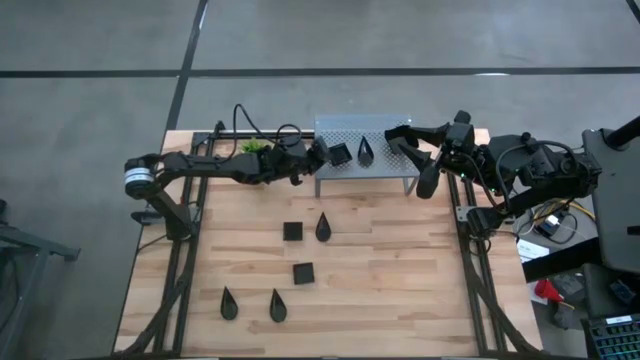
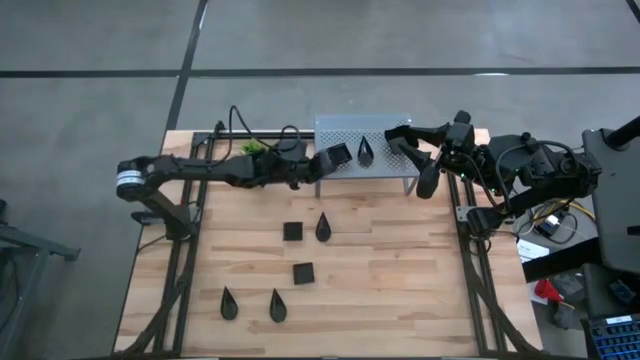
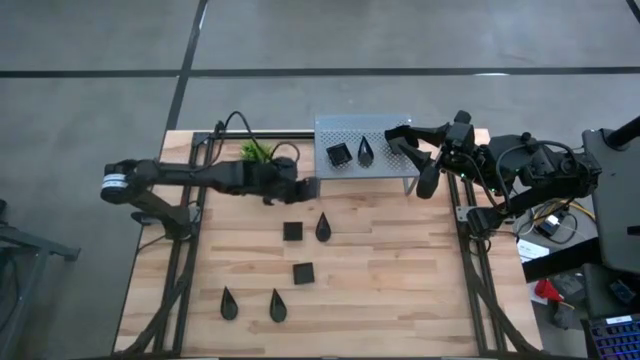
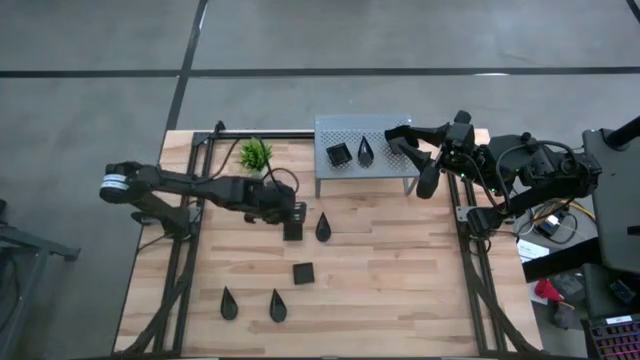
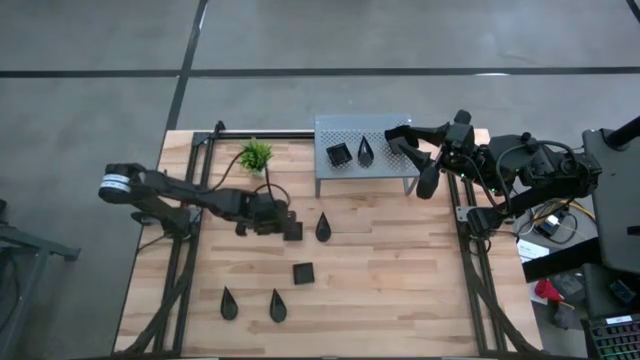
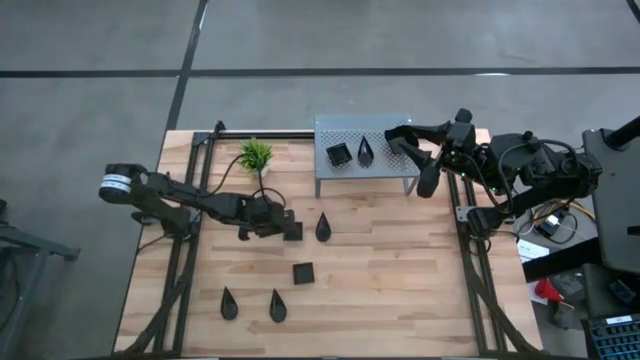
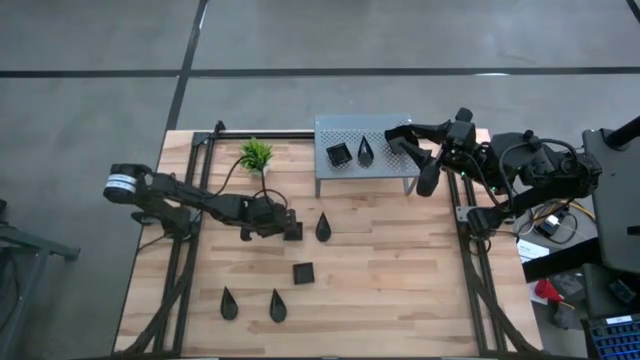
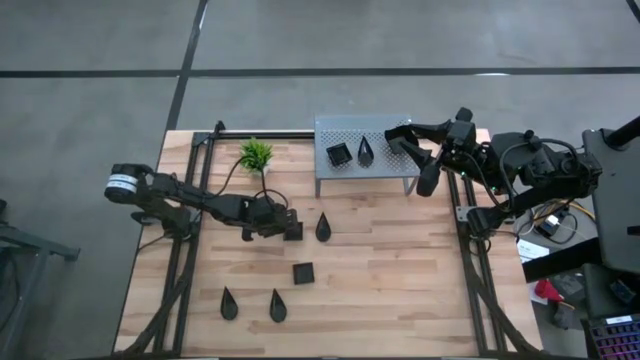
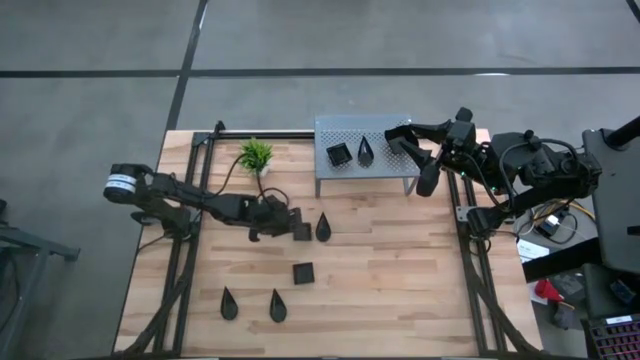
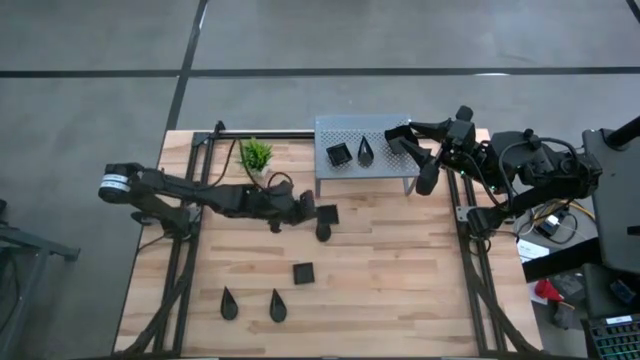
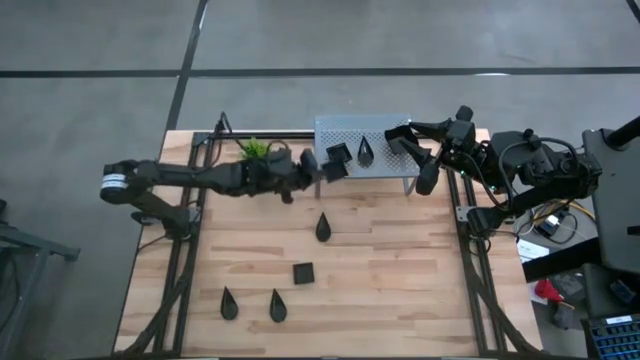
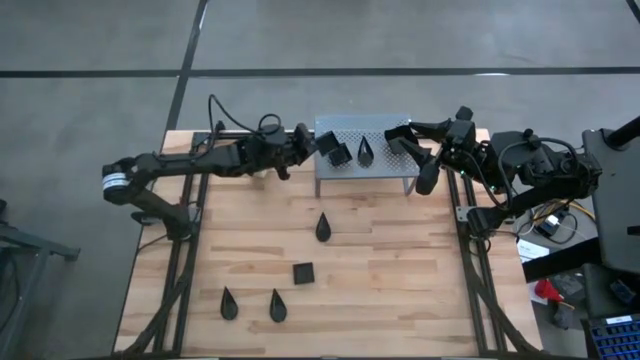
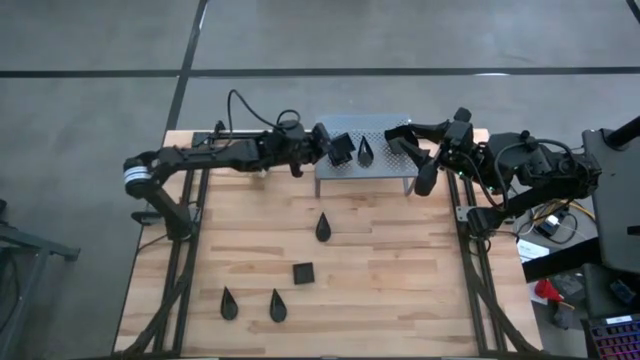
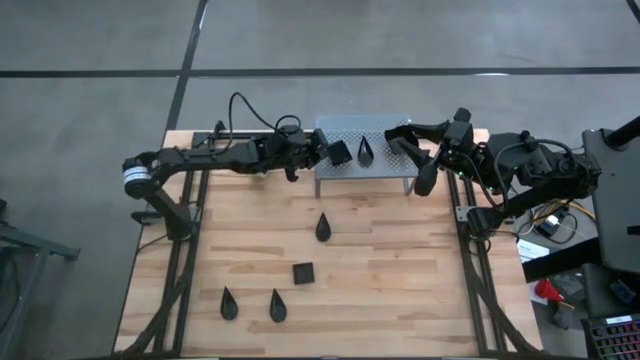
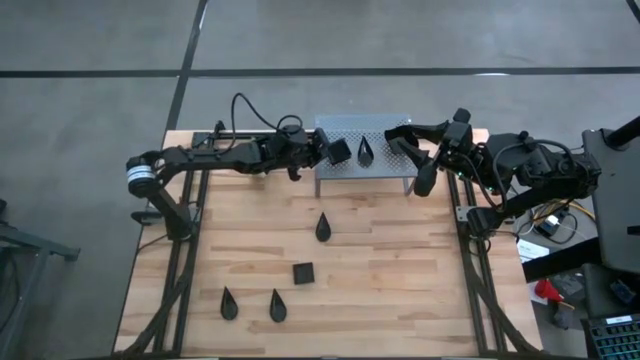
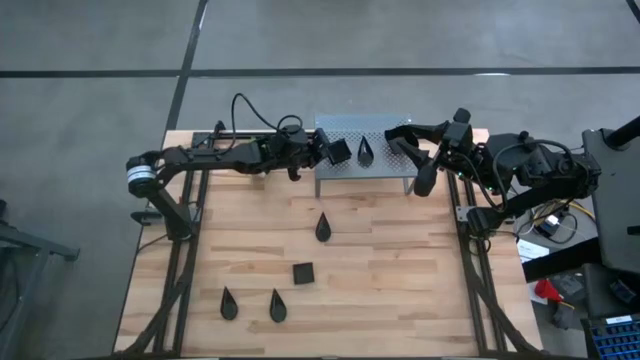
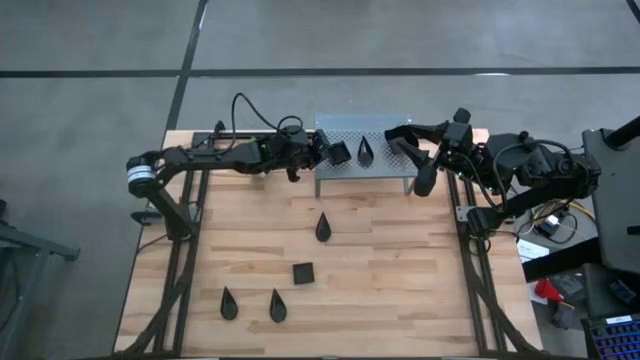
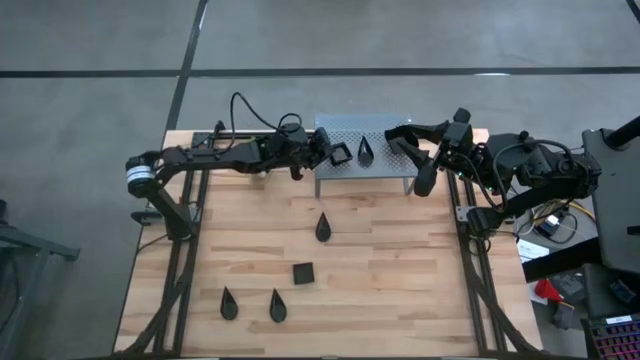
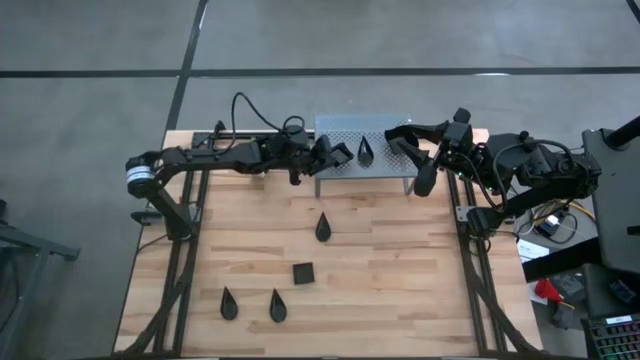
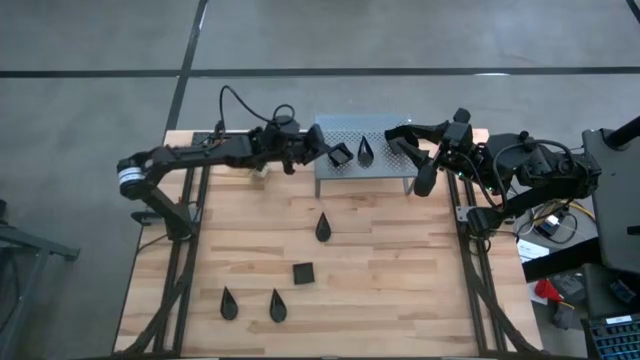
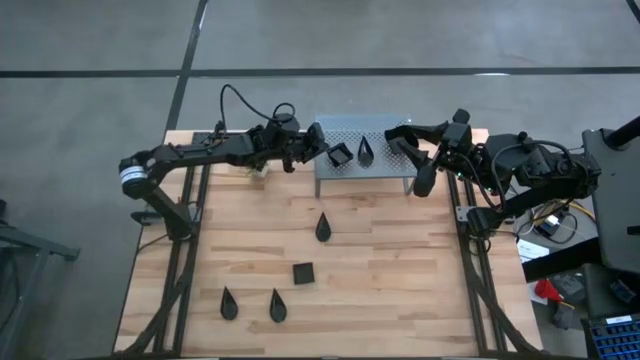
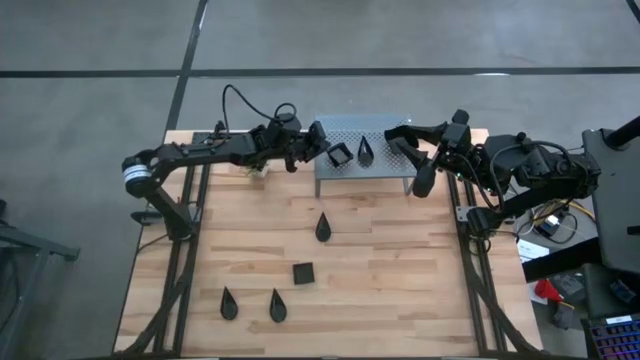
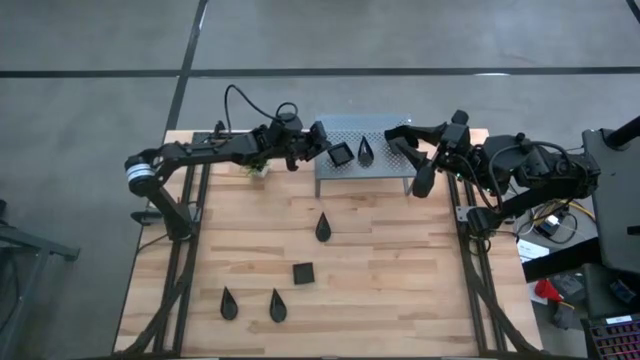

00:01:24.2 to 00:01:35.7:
Task: Pick & Place Mini shaped plates
Stack the black square plate on top of the black square plate on the shelf

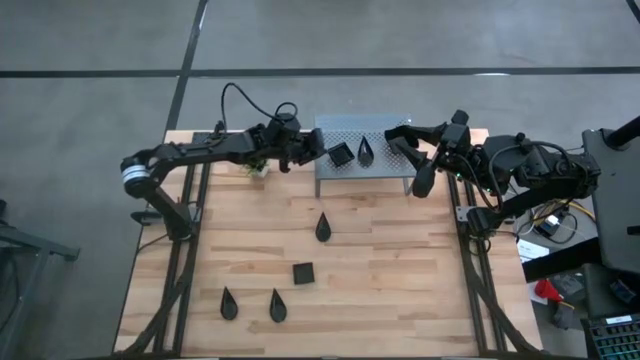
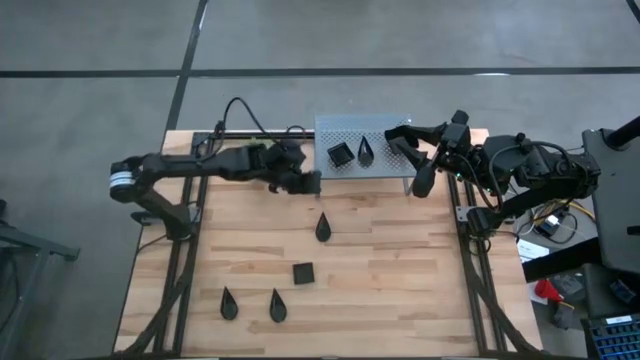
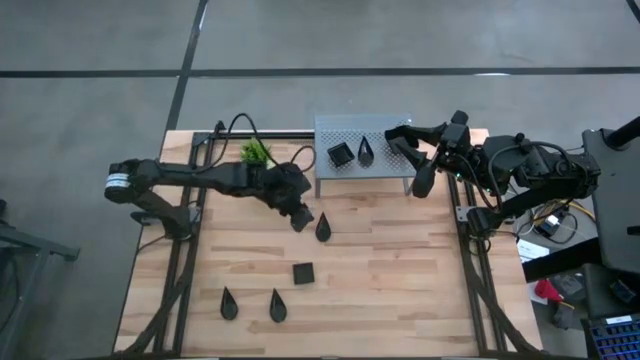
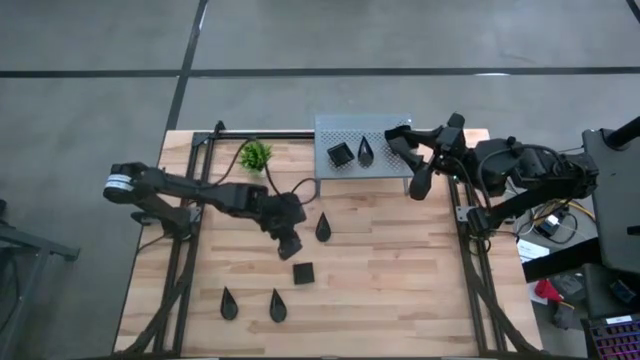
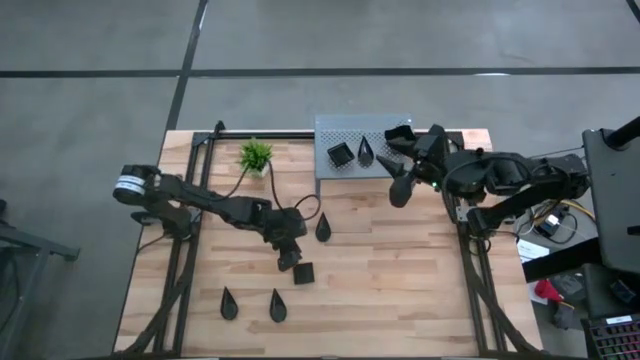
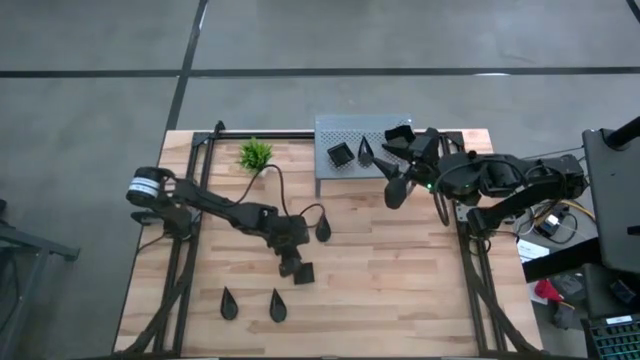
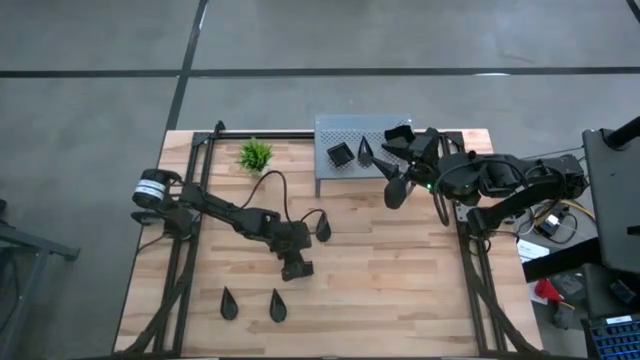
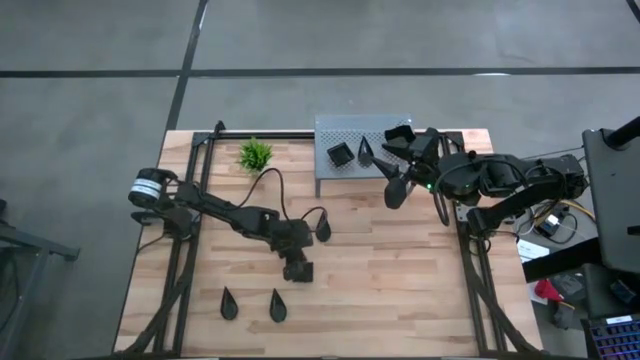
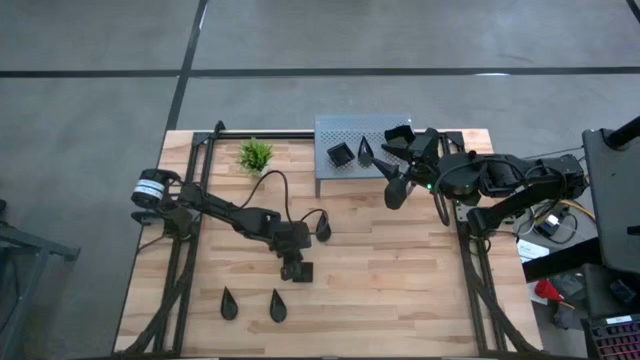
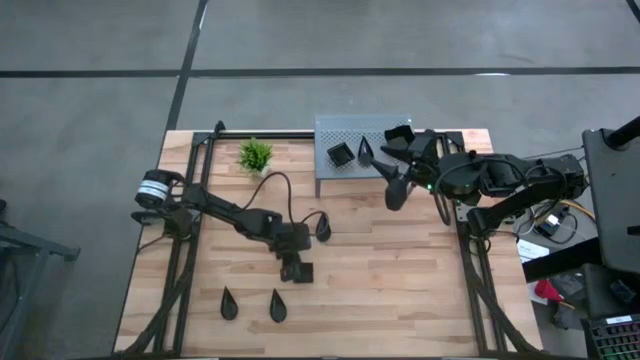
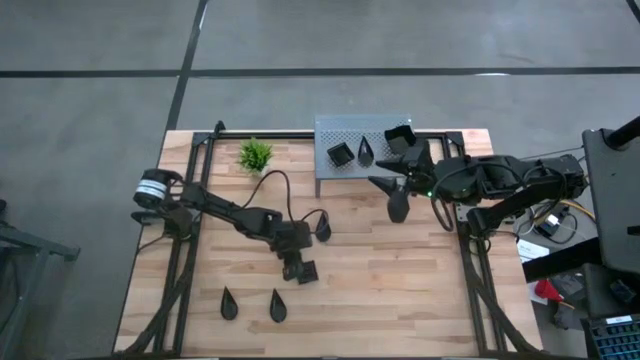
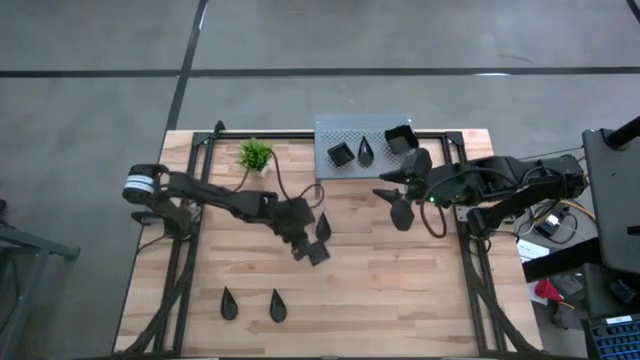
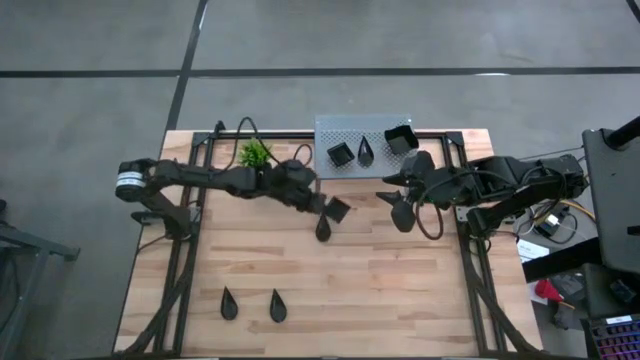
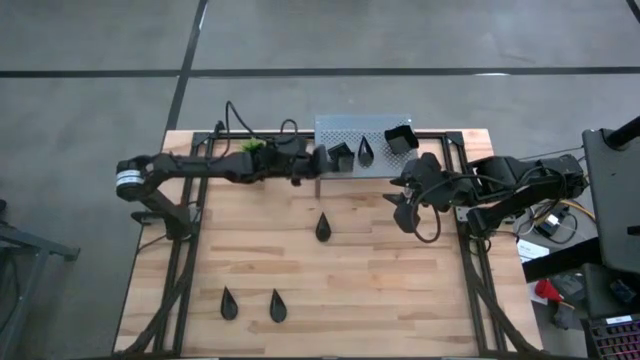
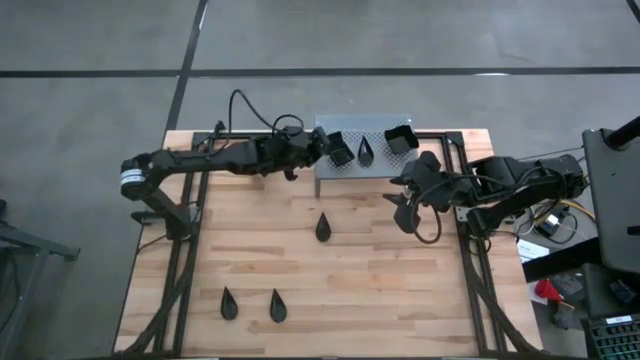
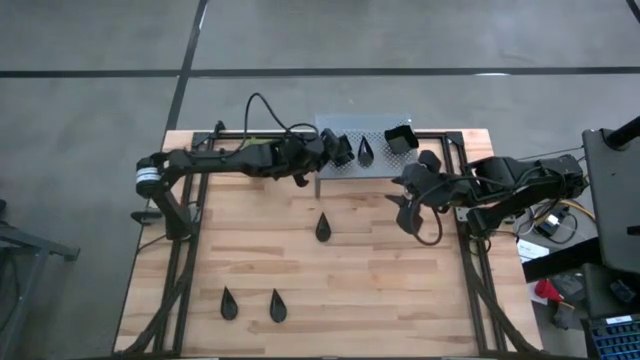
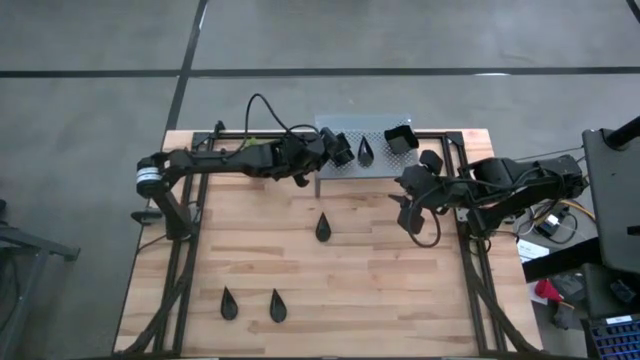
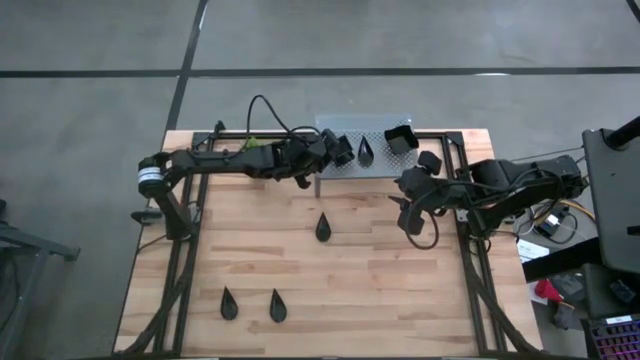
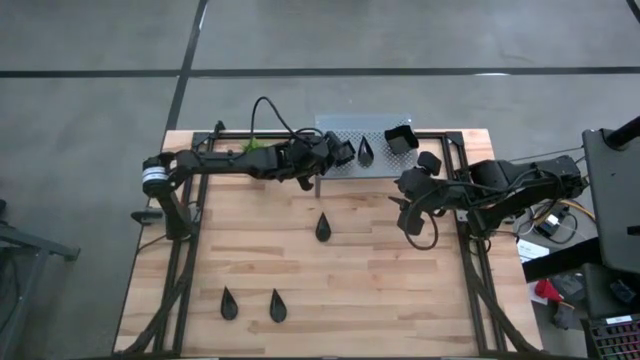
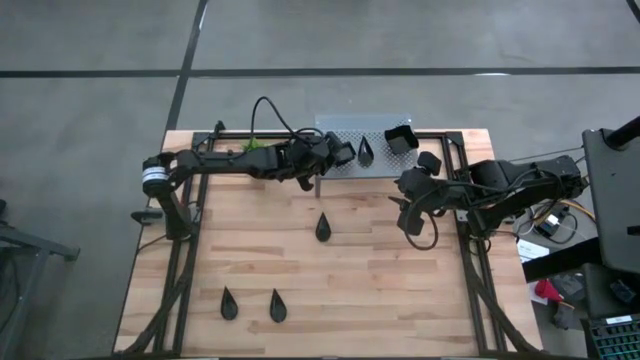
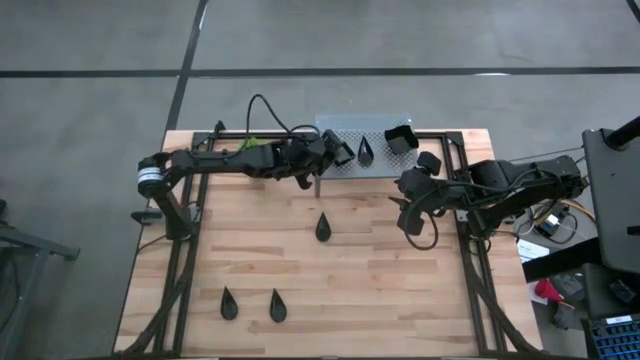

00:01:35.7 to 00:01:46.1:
Stack the black square plate on top of the black square plate on the shelf
